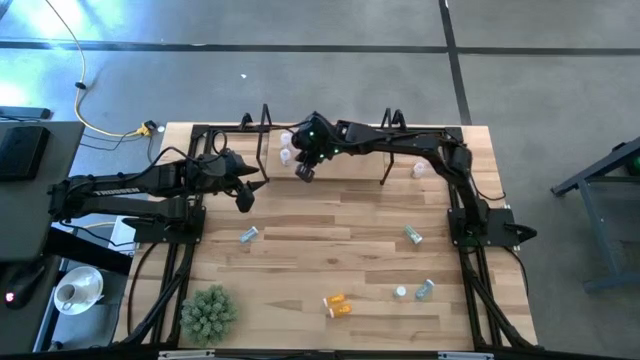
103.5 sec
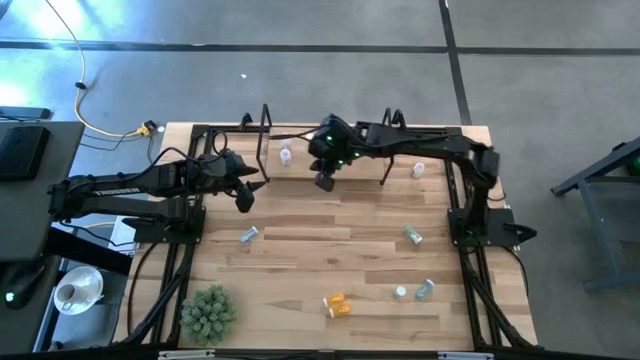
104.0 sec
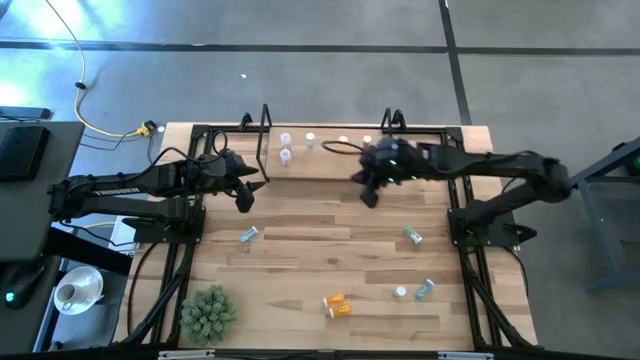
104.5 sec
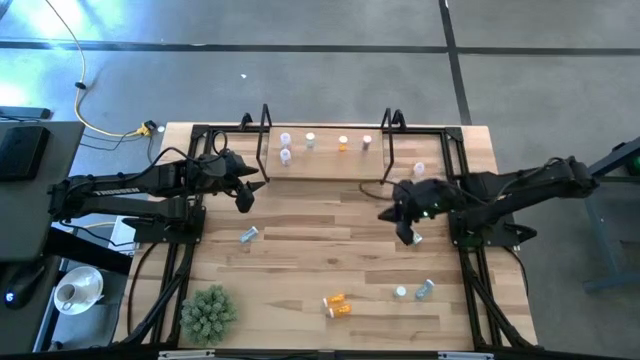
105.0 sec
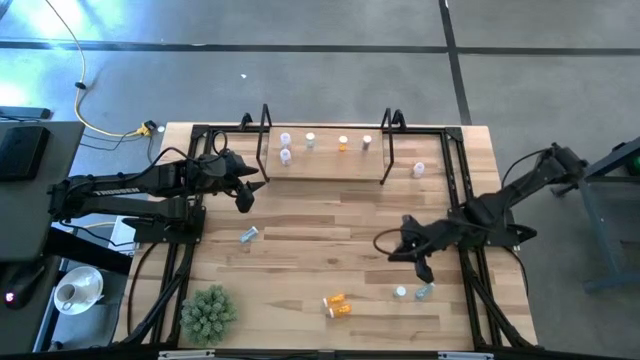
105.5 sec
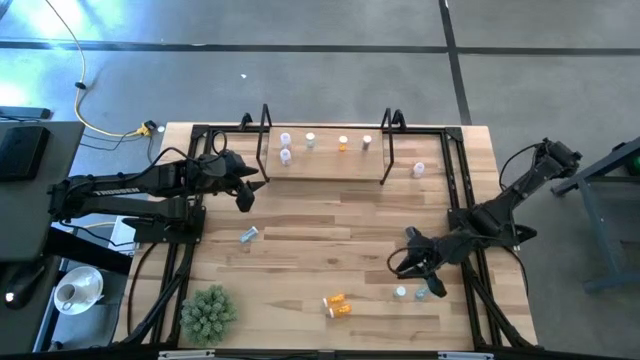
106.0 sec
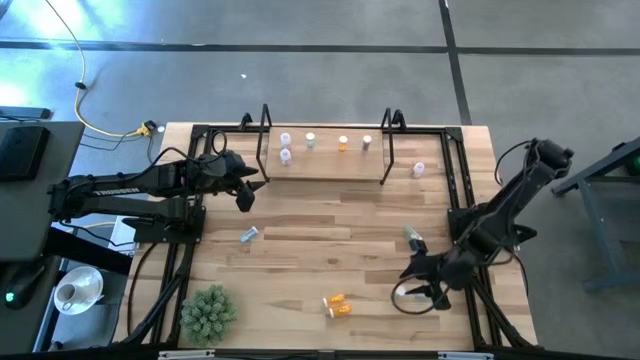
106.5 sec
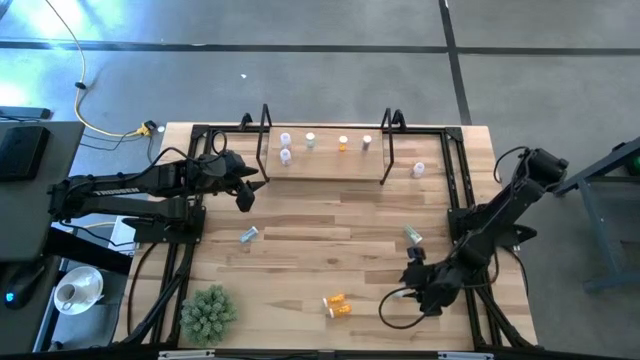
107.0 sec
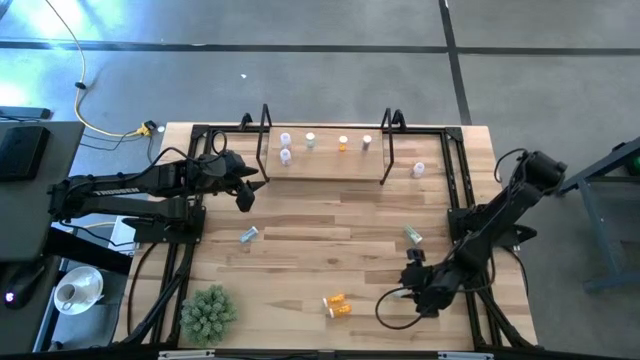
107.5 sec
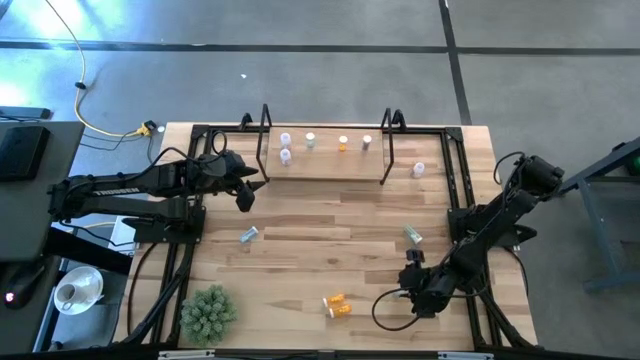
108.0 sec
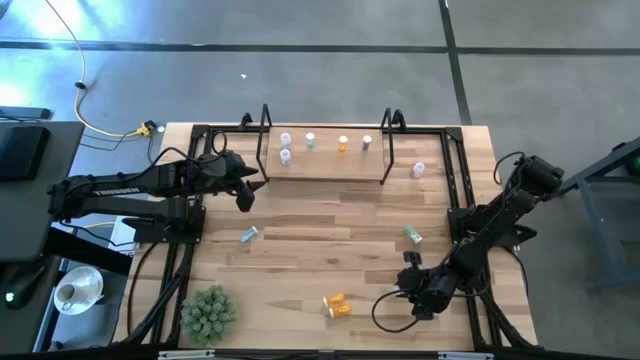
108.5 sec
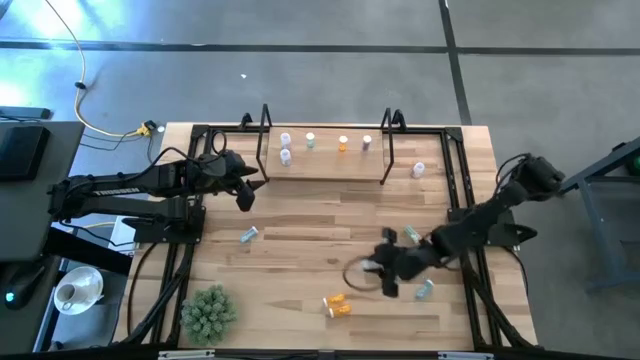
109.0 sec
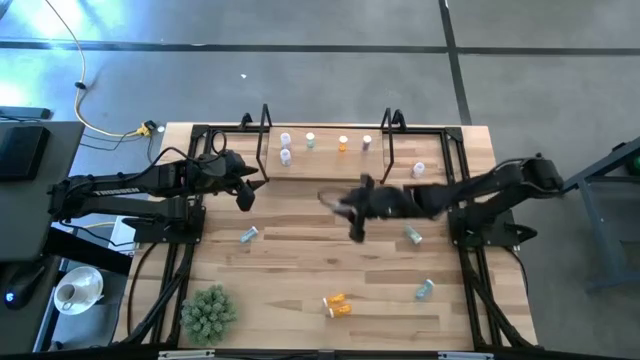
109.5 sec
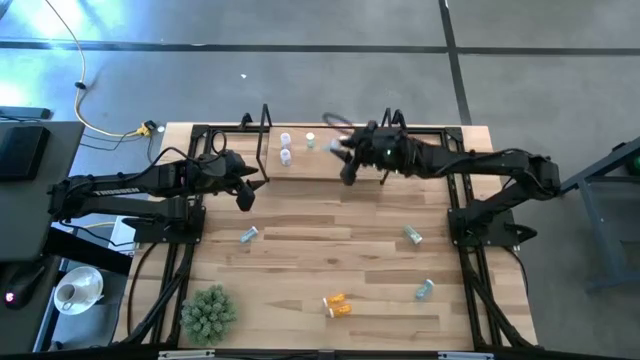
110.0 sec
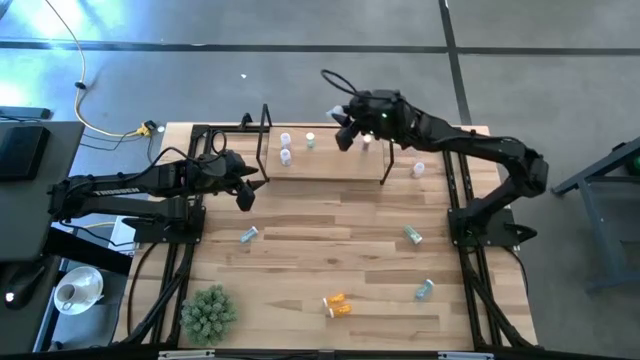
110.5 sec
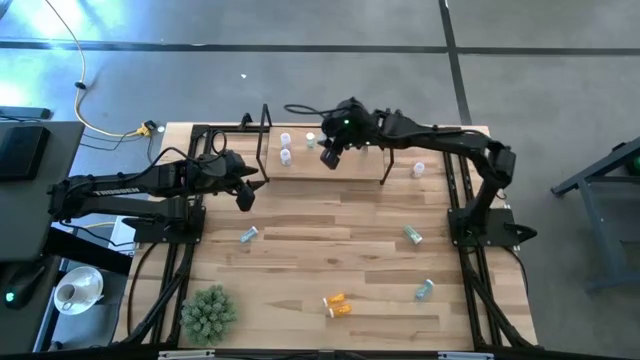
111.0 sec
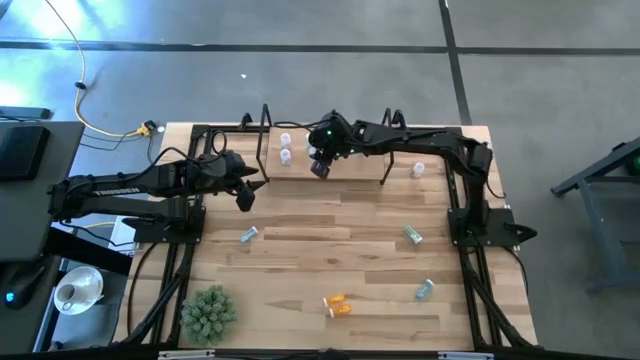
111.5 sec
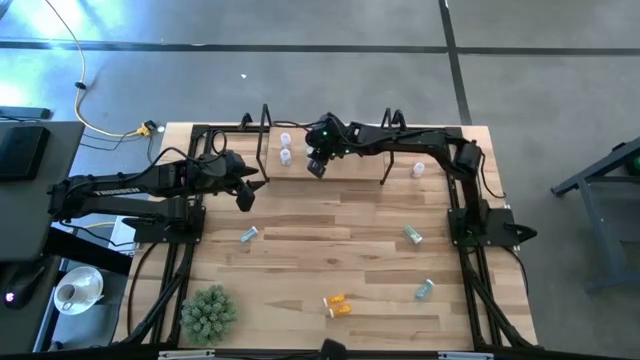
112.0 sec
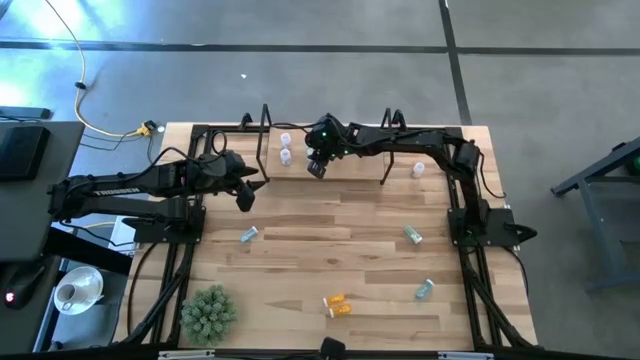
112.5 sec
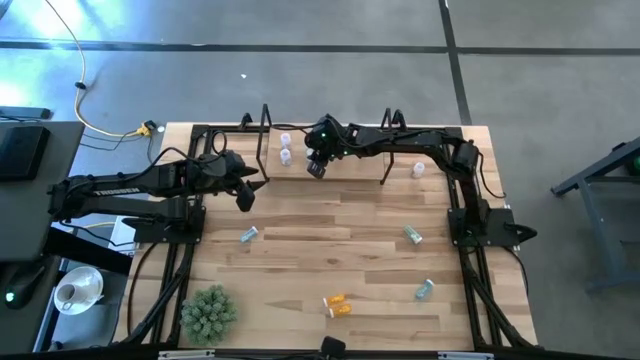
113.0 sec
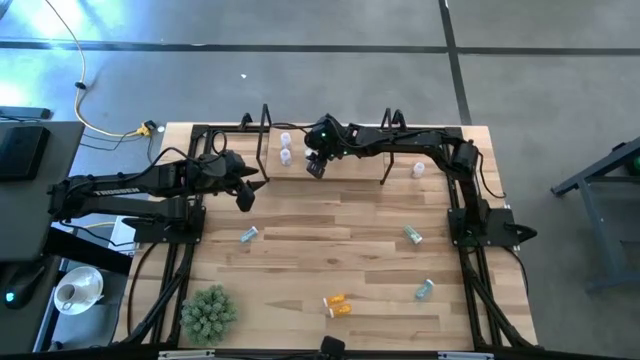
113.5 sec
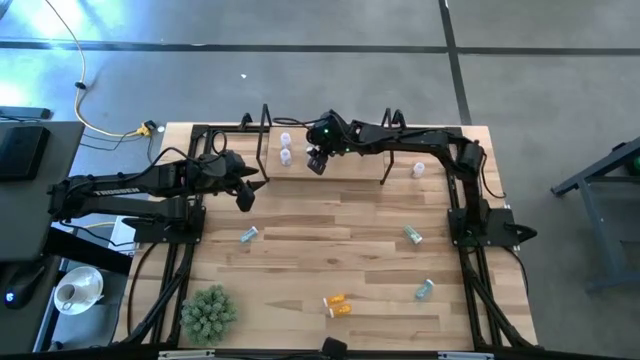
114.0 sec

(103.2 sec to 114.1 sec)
Task: Pick and place medicine bottles onto shelf by color
Put the bottom green pill bottle on the shelf aligned with the other green pill bottle

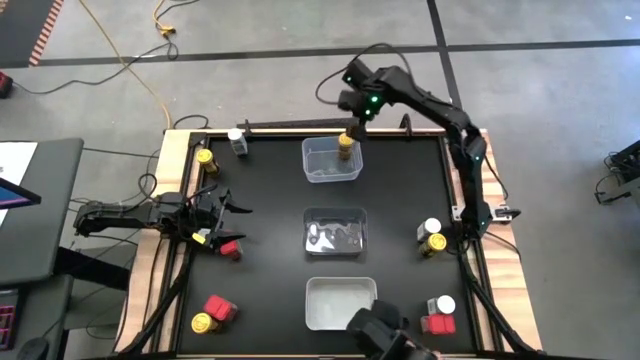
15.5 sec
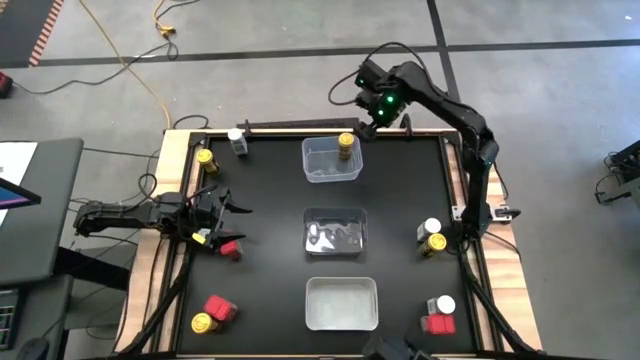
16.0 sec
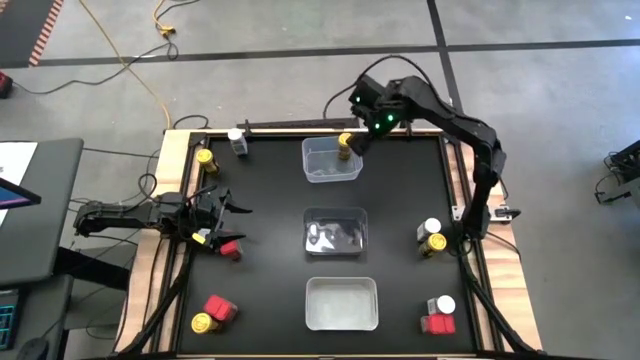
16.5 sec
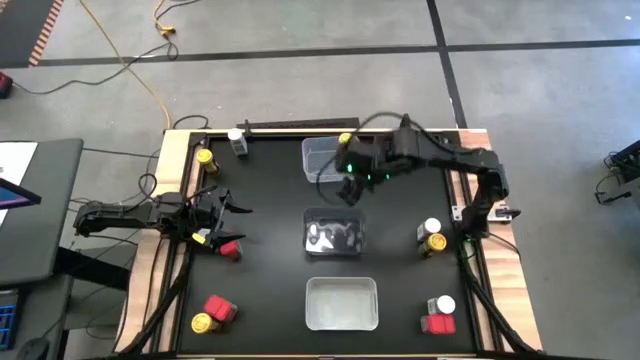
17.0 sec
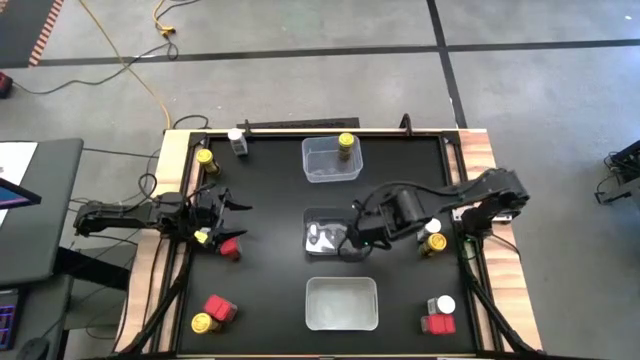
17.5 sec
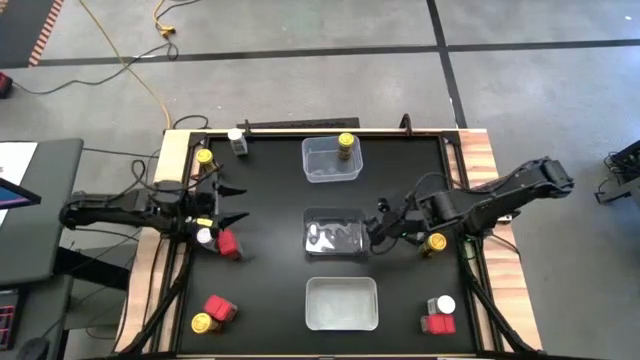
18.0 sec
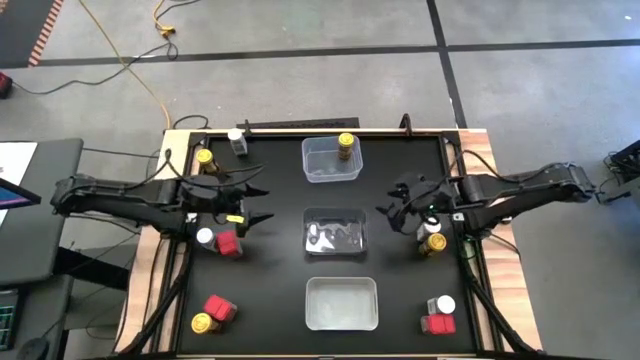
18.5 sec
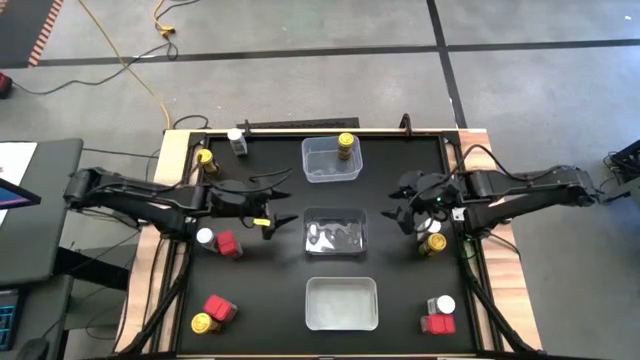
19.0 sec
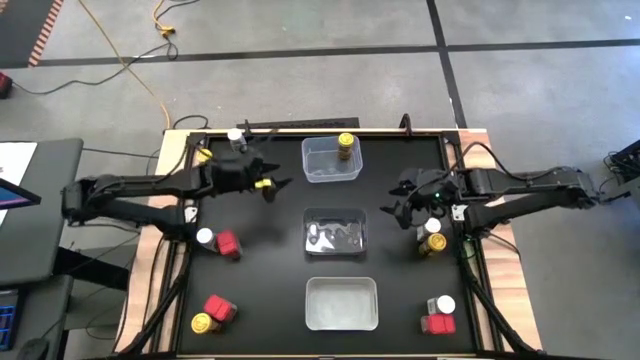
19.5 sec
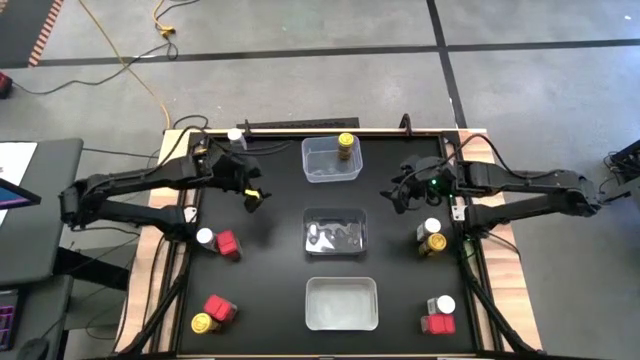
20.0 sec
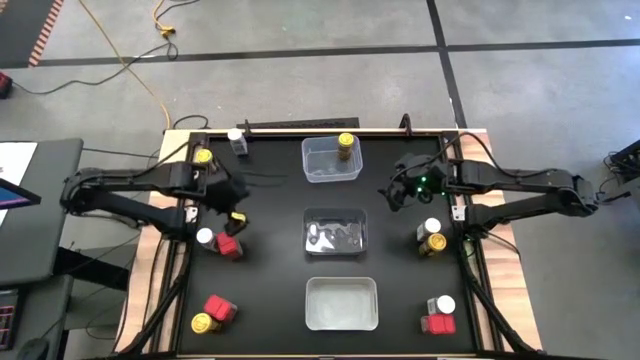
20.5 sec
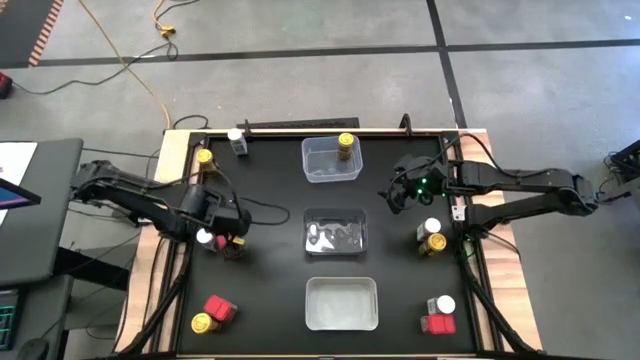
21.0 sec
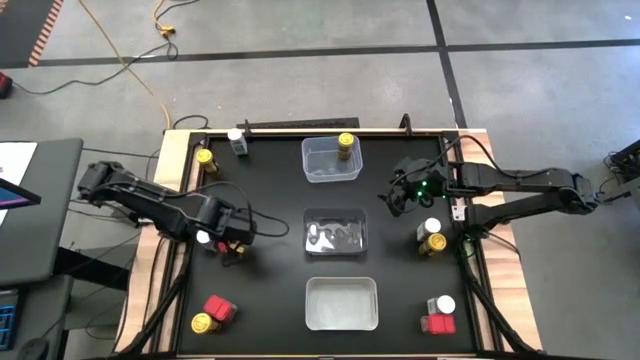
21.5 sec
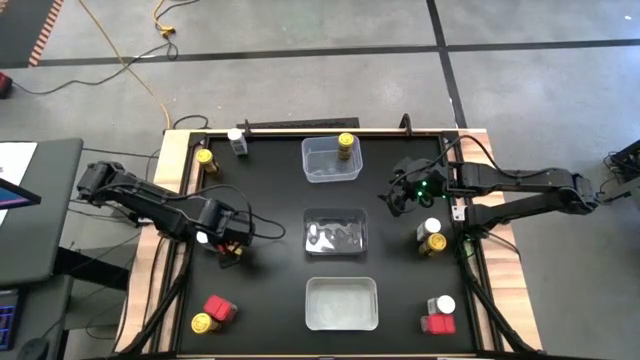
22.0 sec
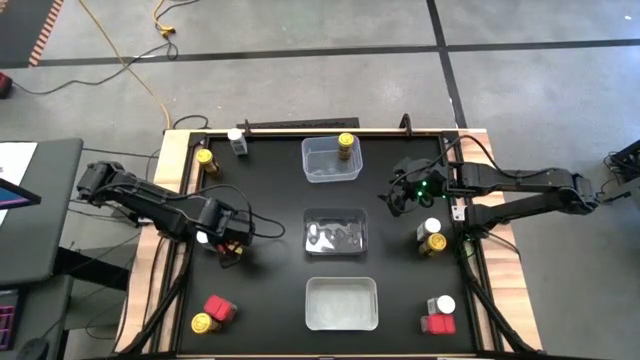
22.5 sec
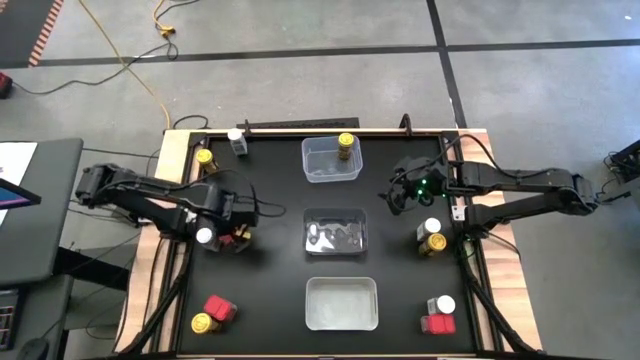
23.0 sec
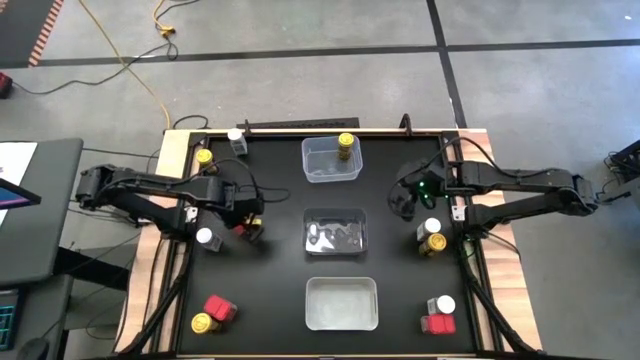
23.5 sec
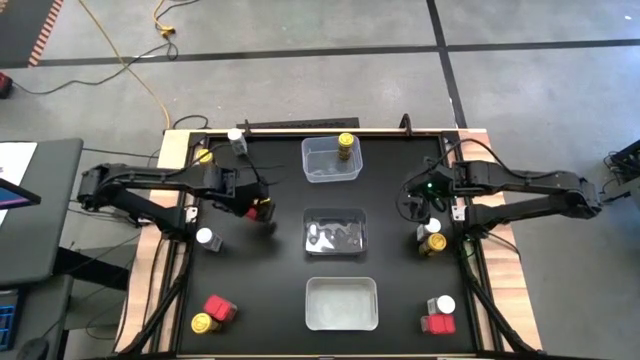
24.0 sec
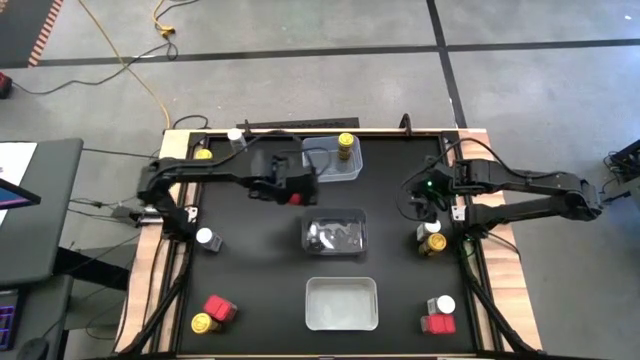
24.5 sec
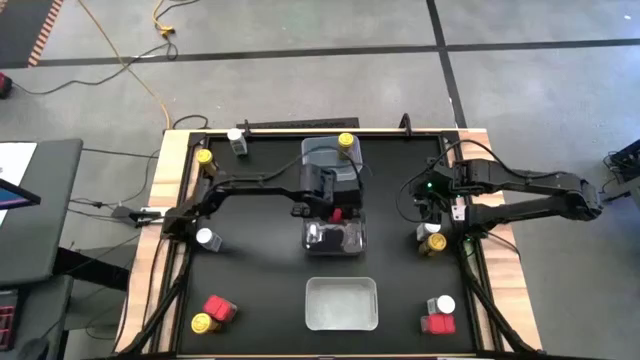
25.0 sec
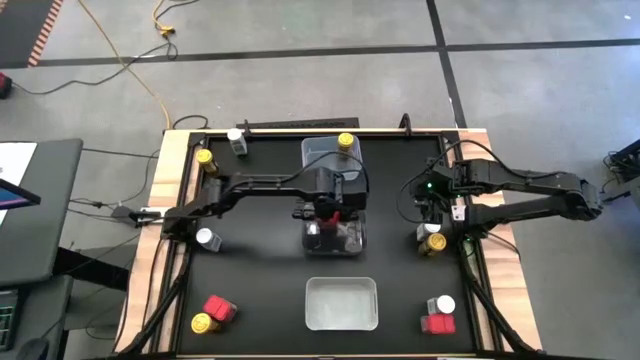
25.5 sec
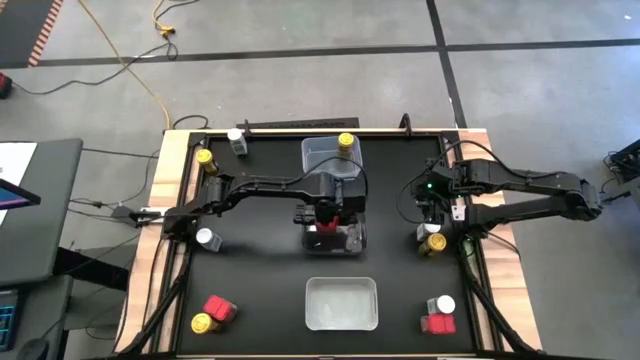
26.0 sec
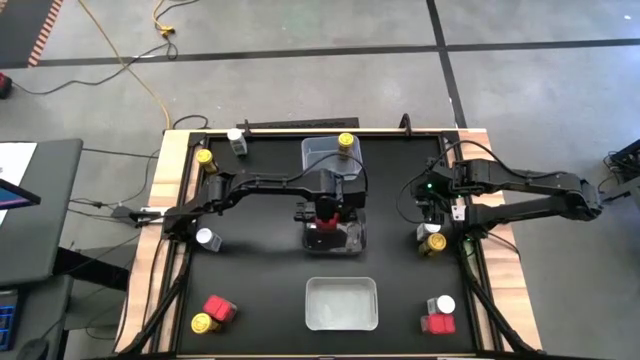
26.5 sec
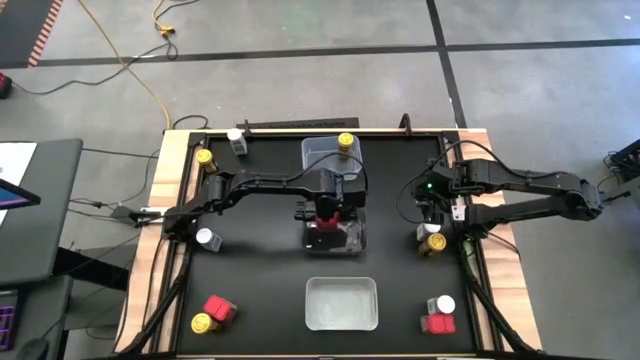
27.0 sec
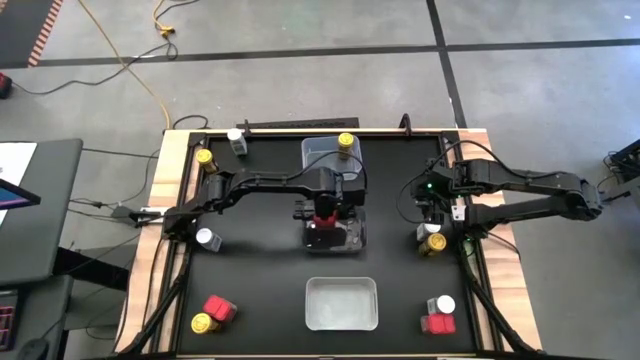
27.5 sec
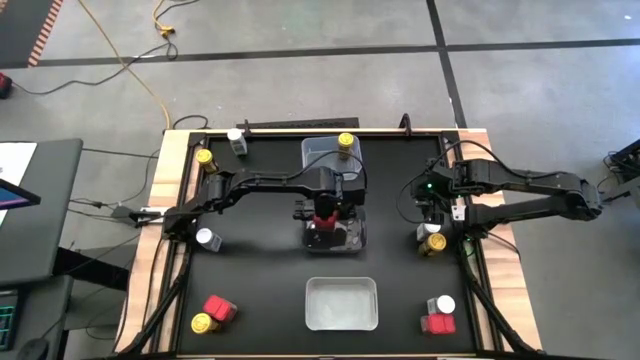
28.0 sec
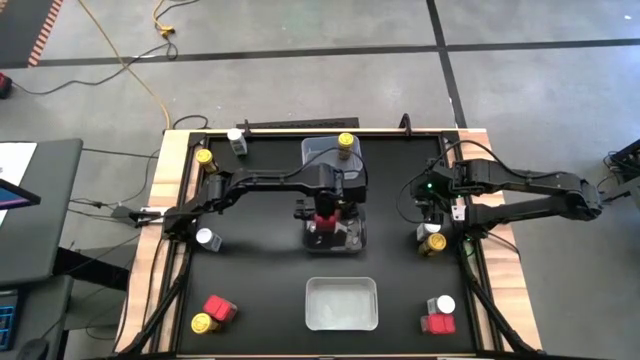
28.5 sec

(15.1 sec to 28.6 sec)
Task: Sort spices by type
Put the top left red seasoning can into the black bin
